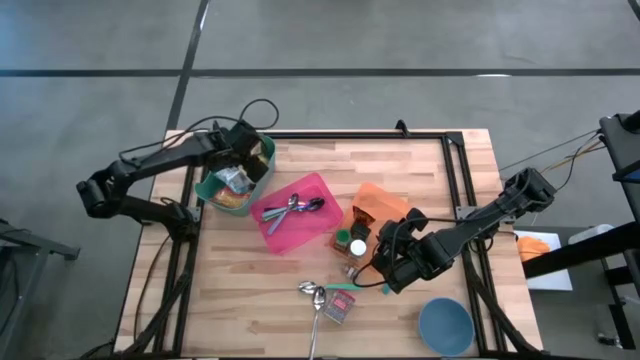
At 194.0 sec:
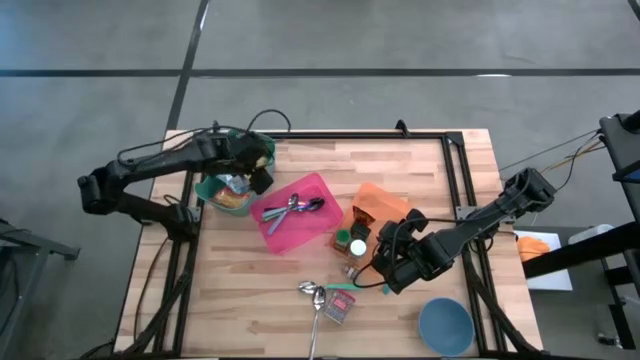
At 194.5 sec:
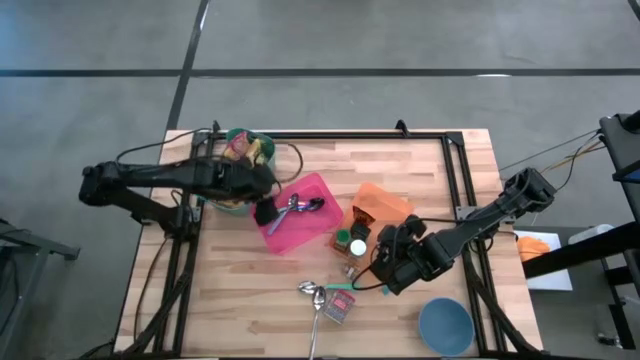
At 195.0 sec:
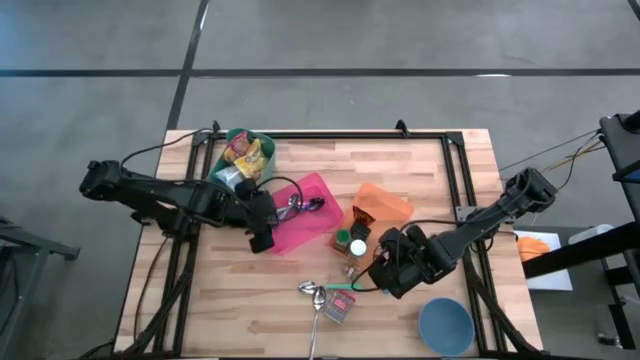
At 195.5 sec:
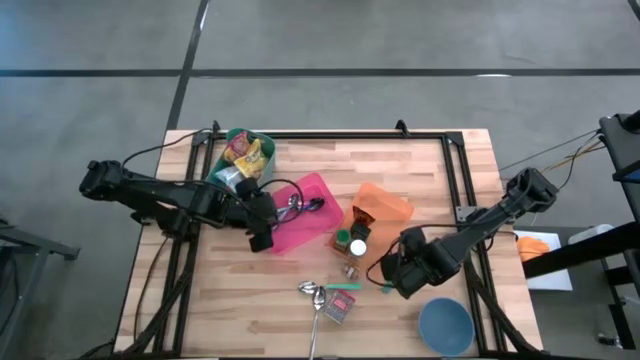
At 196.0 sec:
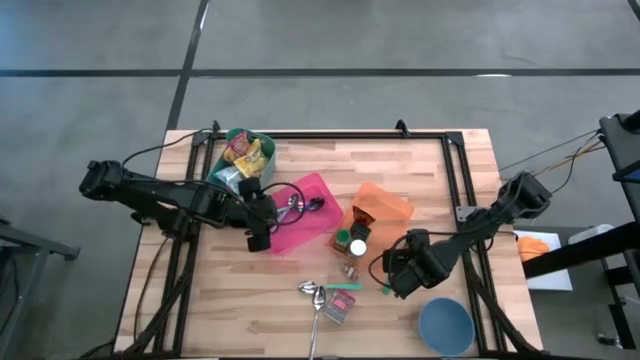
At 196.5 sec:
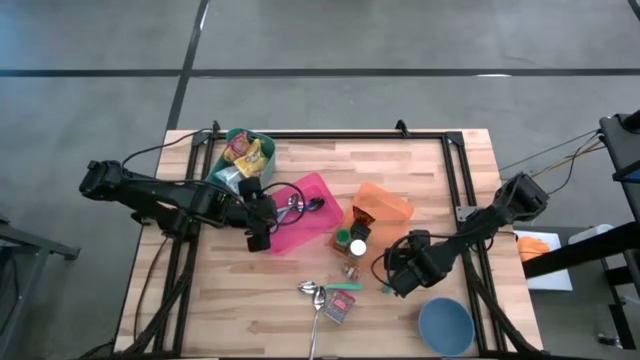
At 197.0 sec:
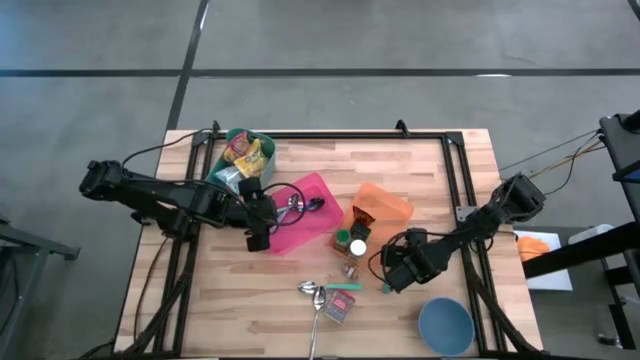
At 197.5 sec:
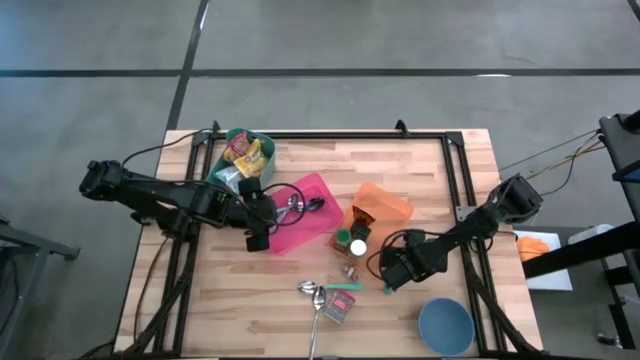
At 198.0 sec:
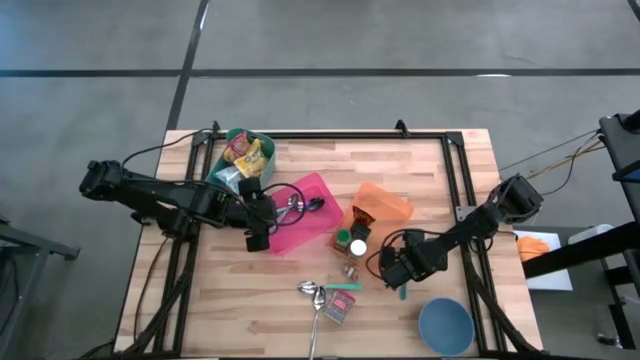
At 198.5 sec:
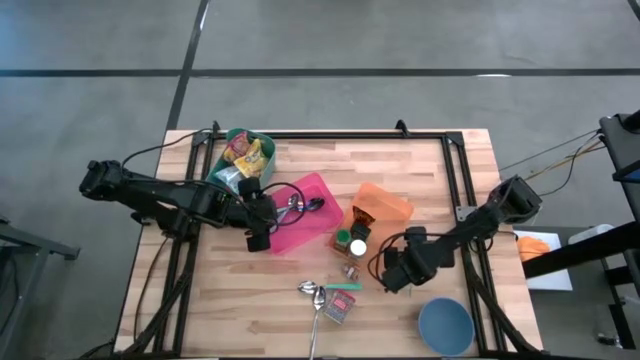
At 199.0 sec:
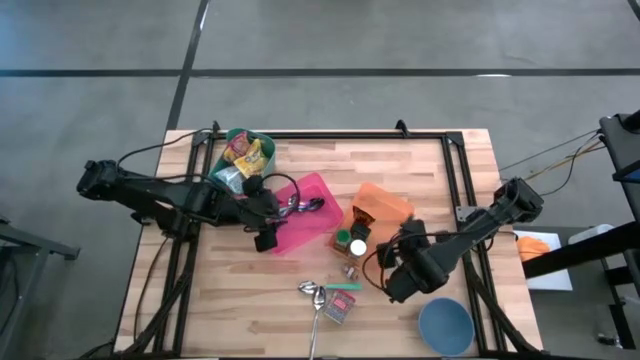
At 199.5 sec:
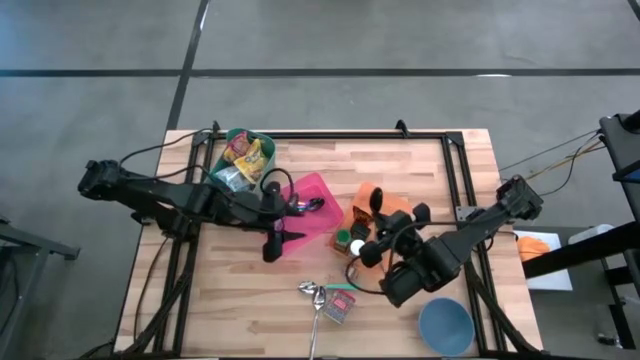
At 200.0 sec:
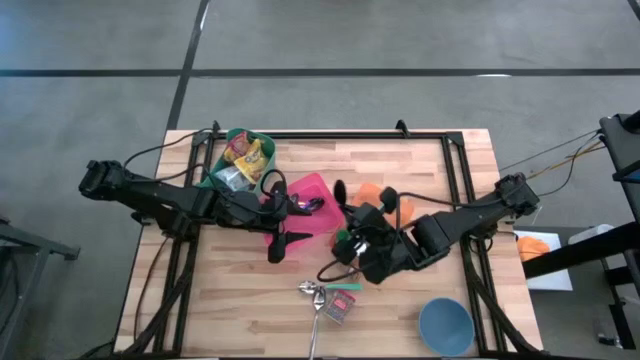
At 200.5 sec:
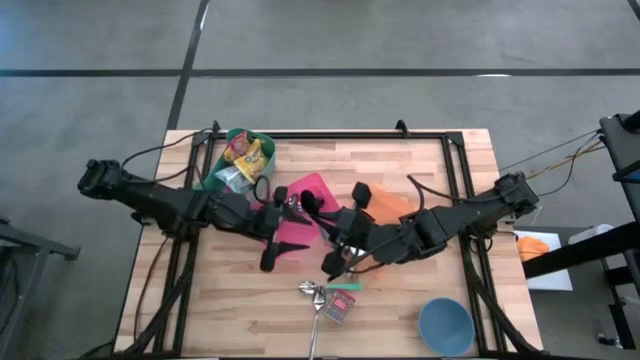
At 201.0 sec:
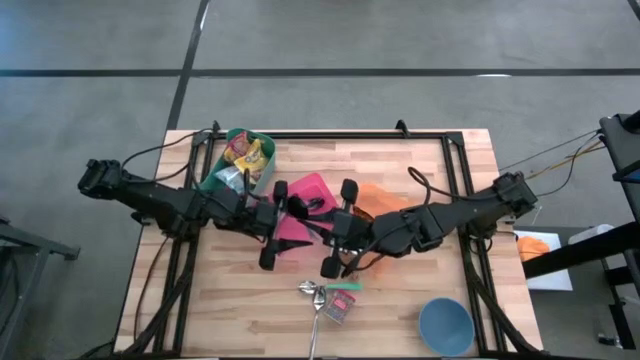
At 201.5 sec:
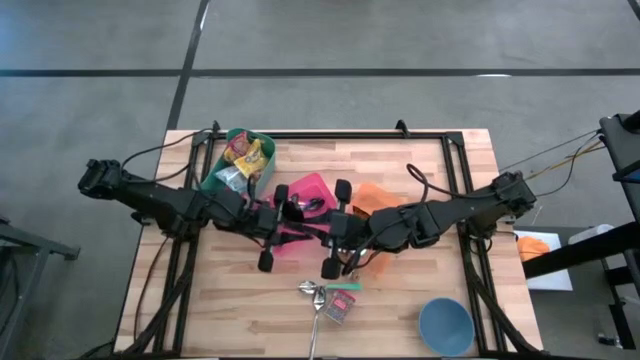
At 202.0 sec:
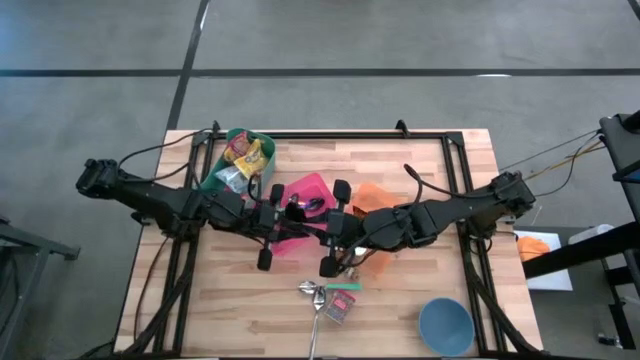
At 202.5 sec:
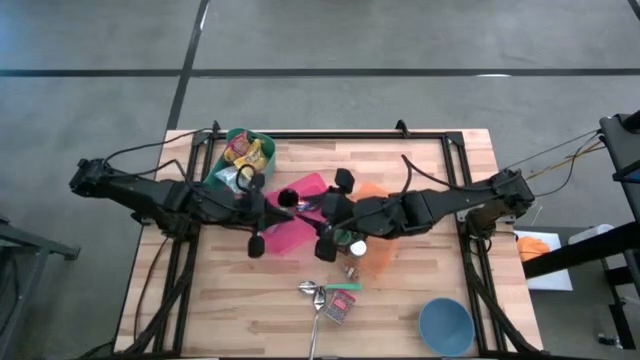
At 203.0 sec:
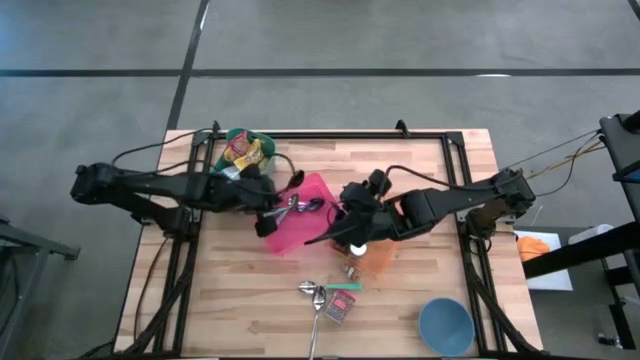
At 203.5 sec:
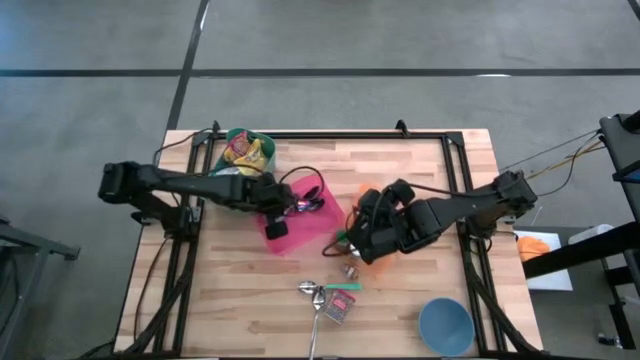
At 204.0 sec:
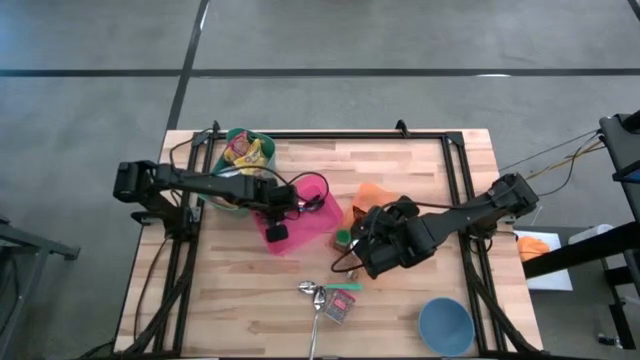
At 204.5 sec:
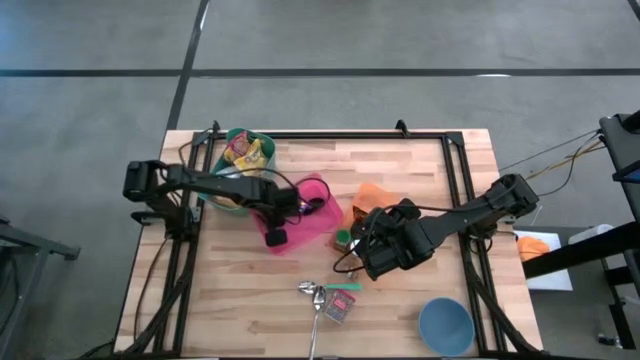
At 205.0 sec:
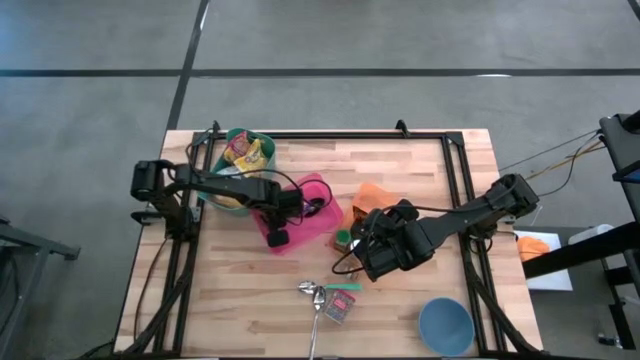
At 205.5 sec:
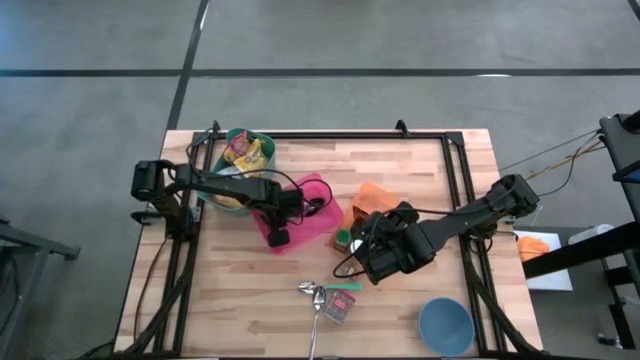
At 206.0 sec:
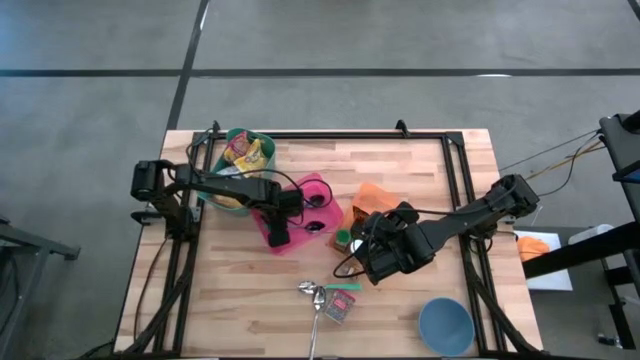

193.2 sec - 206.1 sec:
Put the black spoon into the pink bin

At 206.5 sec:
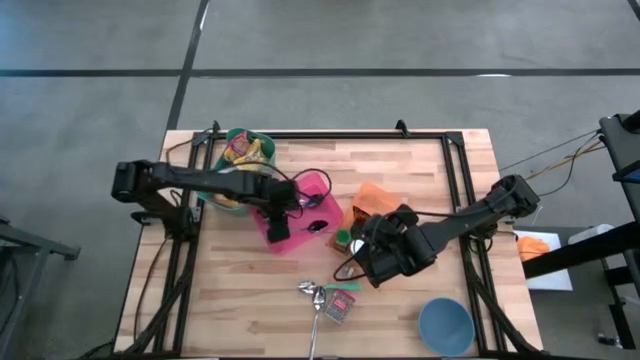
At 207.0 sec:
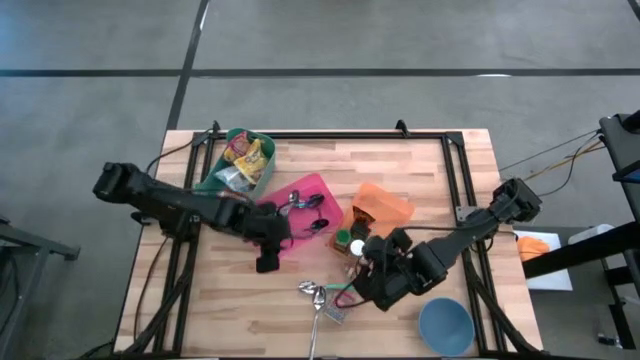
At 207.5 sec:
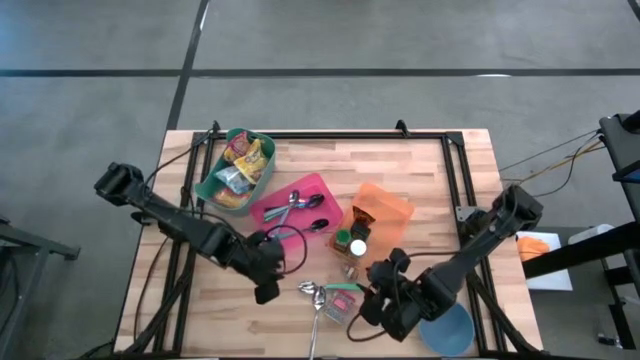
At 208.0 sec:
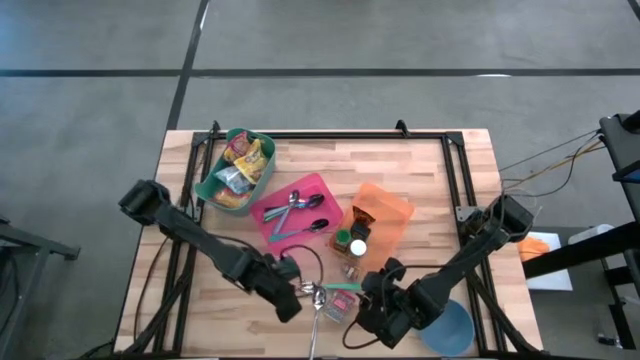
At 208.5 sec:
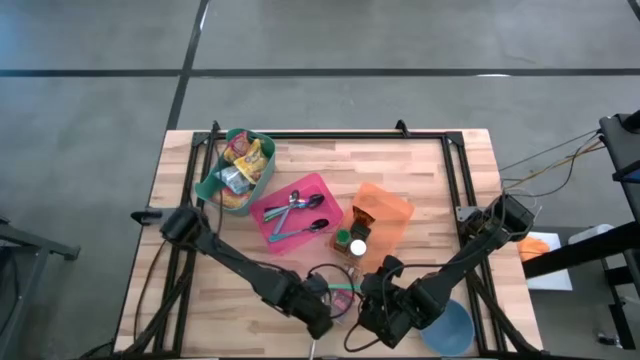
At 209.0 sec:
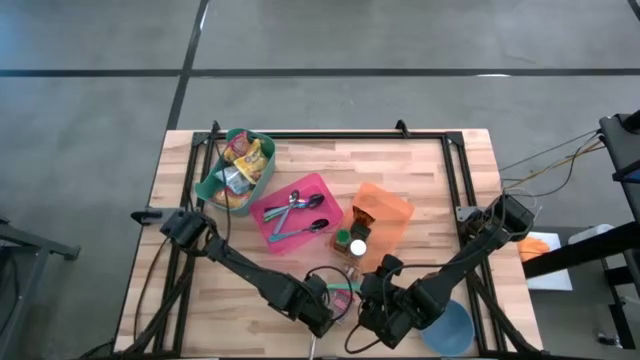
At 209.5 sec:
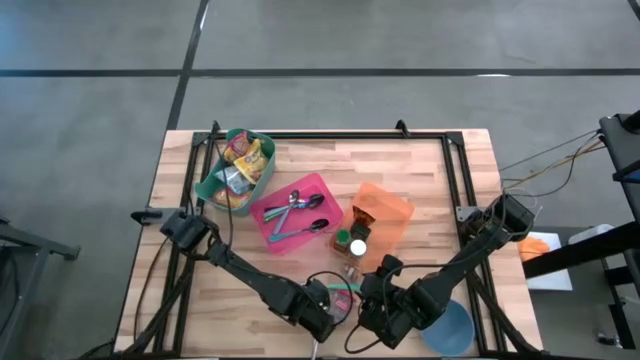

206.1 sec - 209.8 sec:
Put the silver spoon into the pink bin

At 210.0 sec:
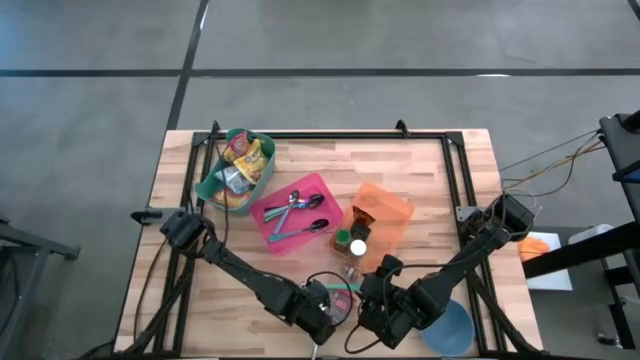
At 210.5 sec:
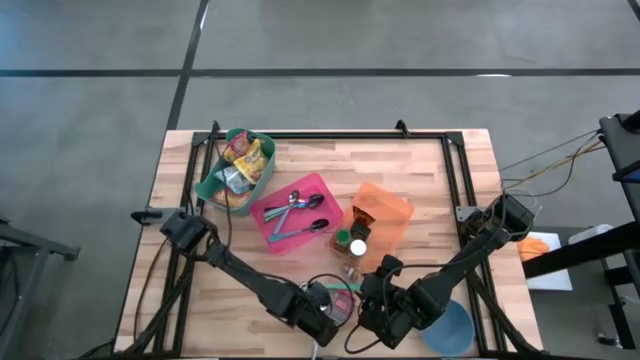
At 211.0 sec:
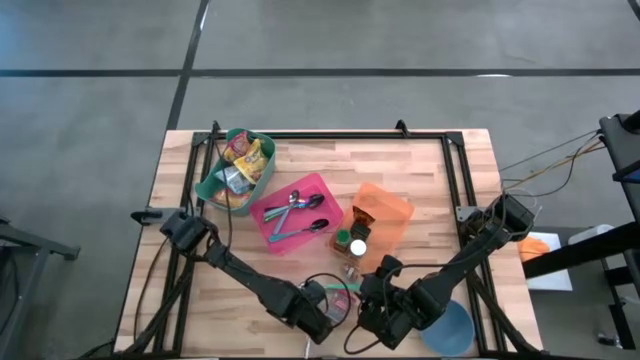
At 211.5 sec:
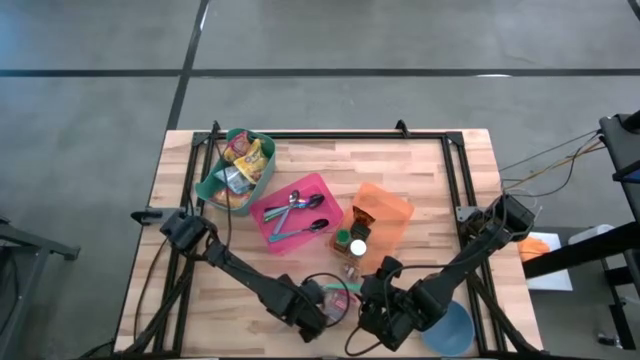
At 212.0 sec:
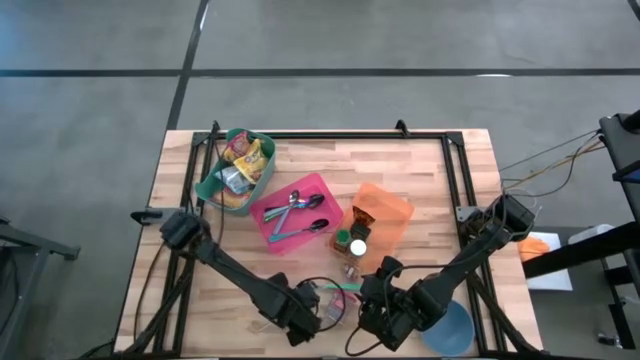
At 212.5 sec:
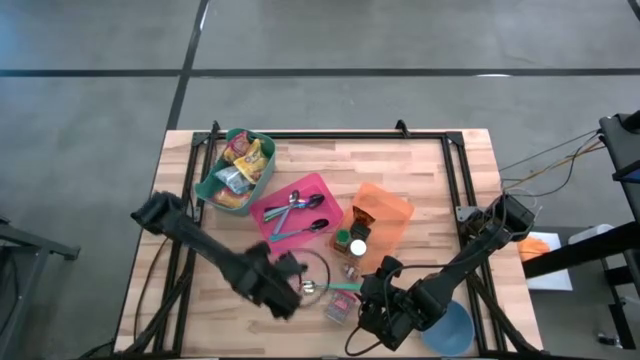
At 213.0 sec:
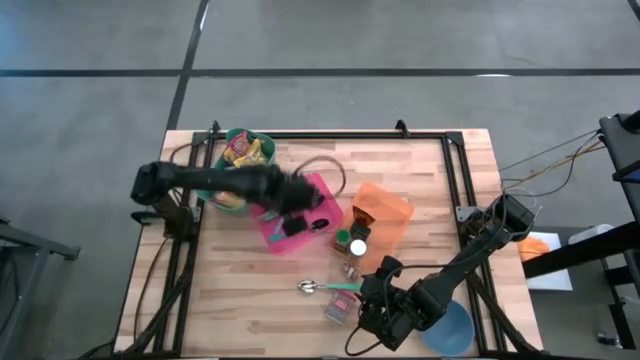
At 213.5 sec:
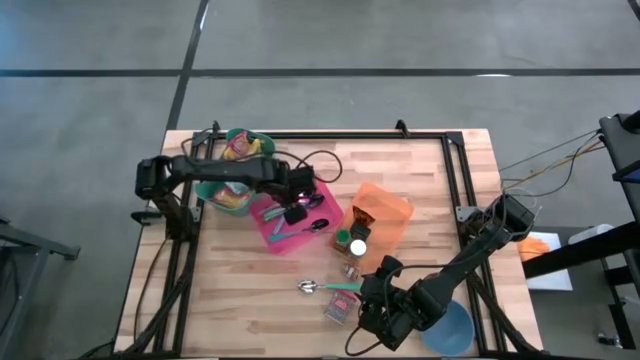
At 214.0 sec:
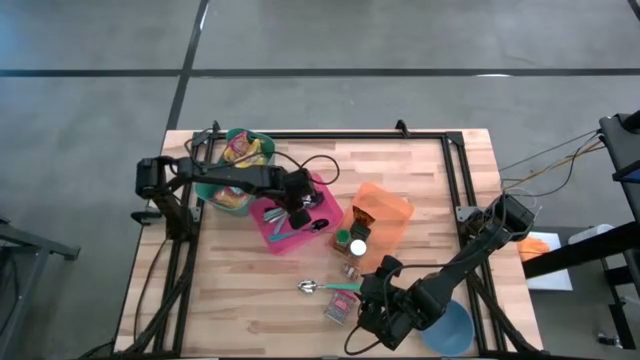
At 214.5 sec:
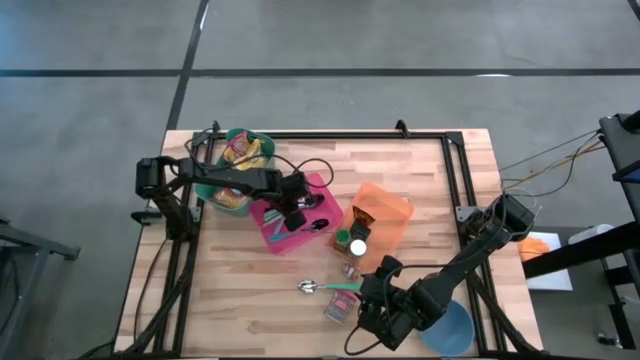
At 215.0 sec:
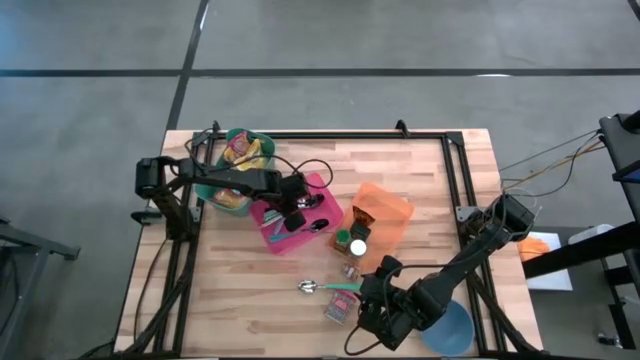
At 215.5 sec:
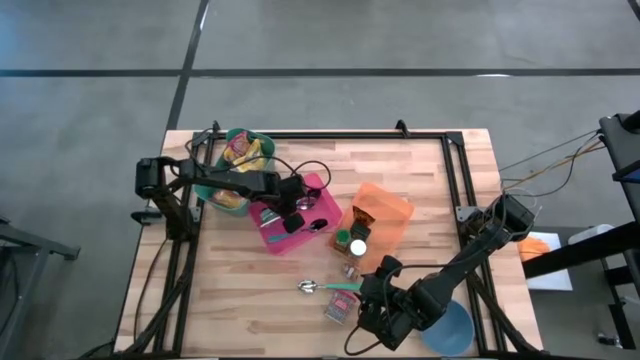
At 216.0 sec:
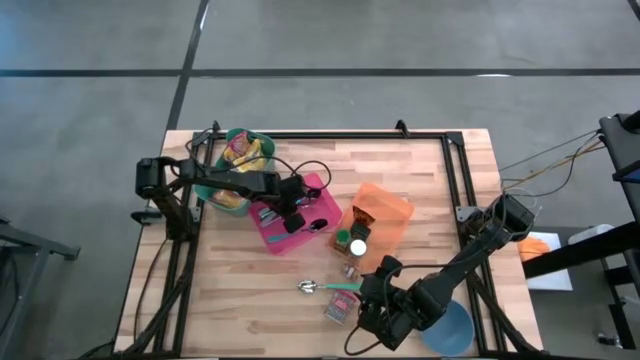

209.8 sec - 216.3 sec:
Put the silver spoon into the pink bin
